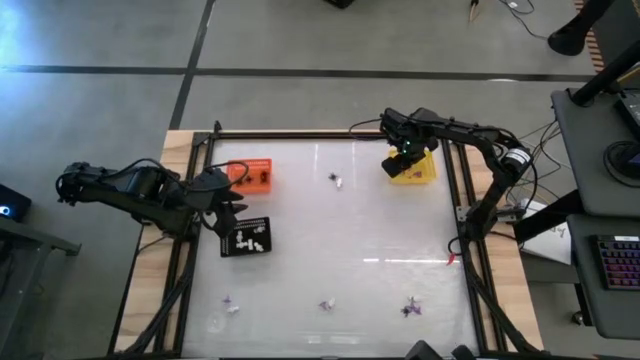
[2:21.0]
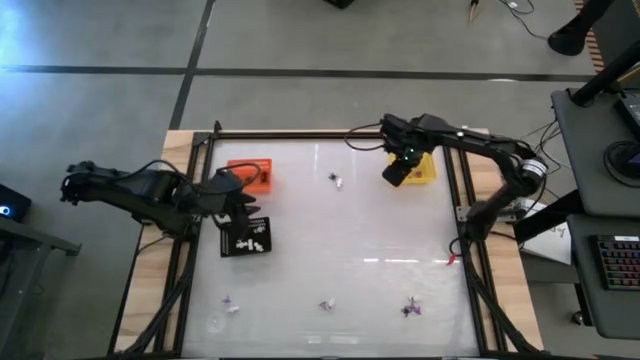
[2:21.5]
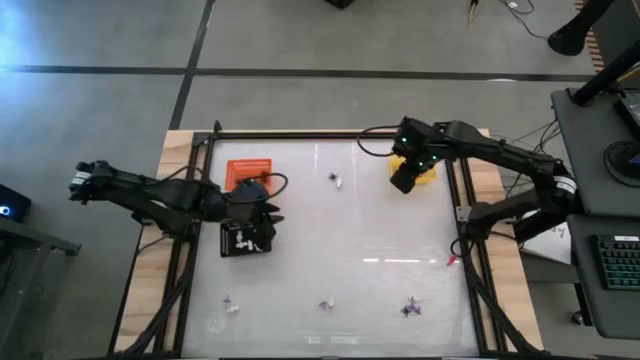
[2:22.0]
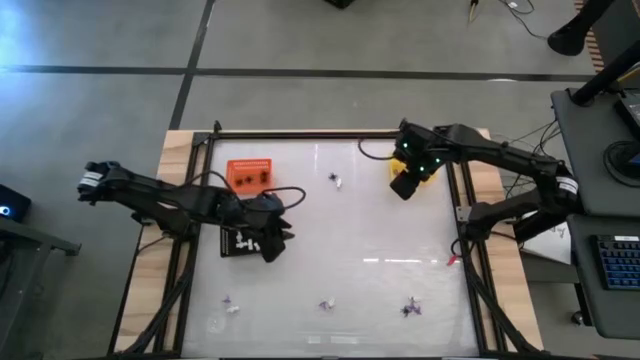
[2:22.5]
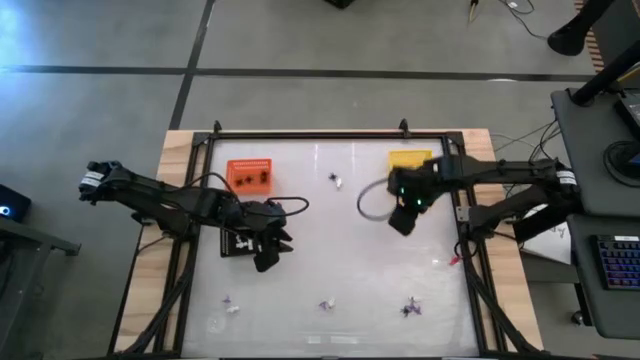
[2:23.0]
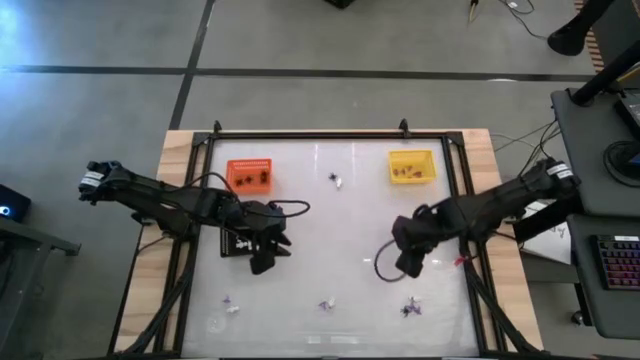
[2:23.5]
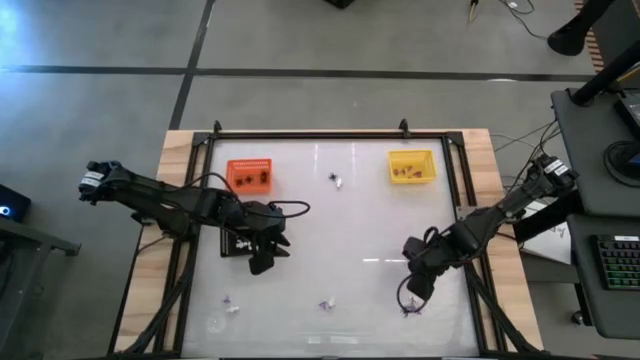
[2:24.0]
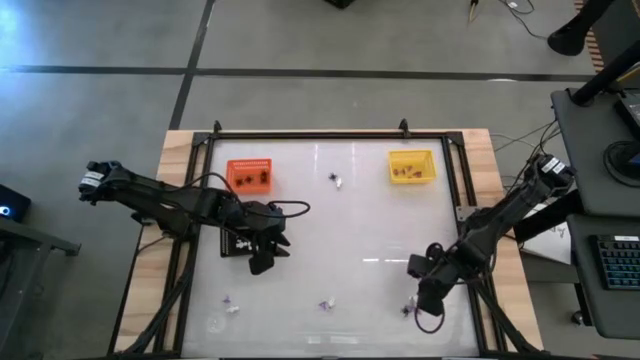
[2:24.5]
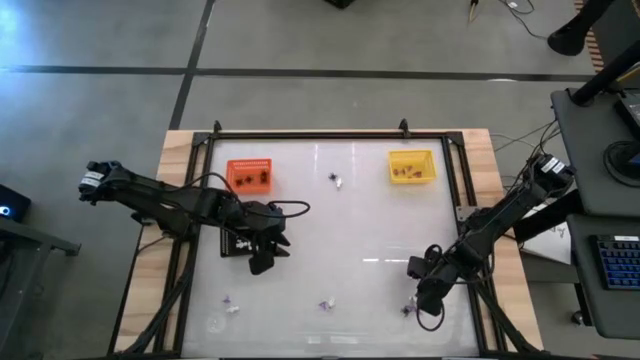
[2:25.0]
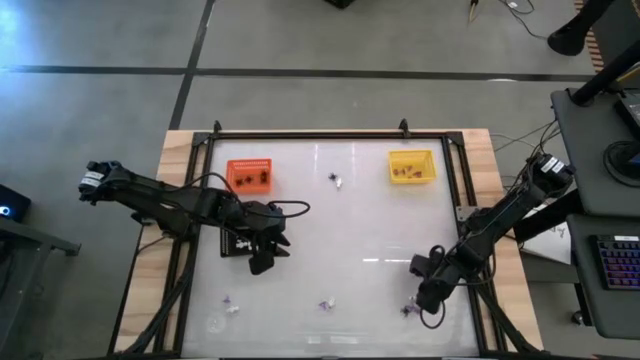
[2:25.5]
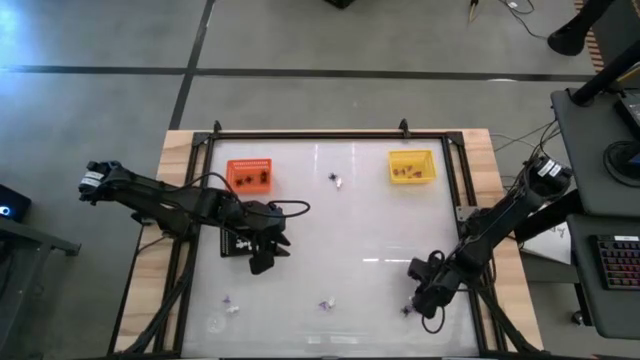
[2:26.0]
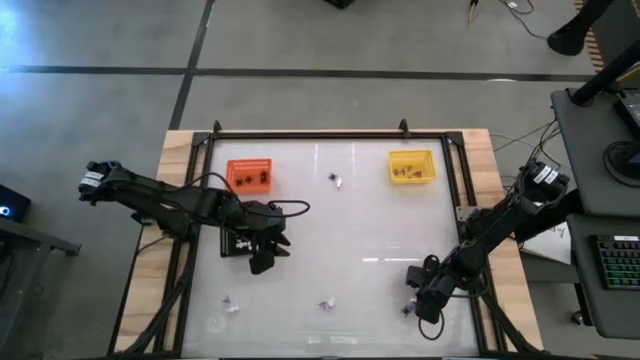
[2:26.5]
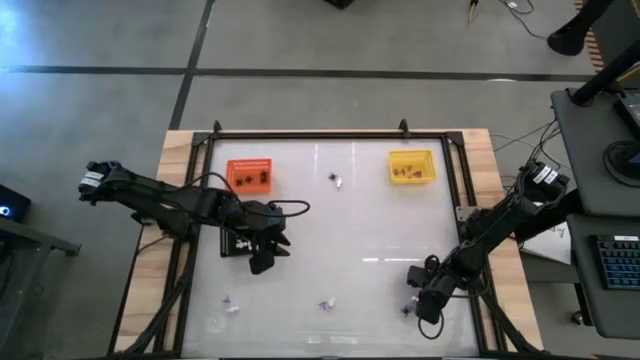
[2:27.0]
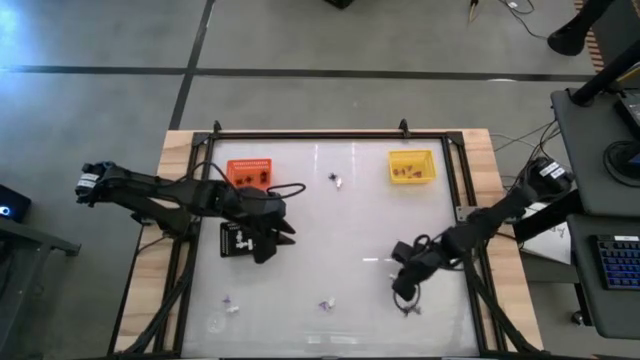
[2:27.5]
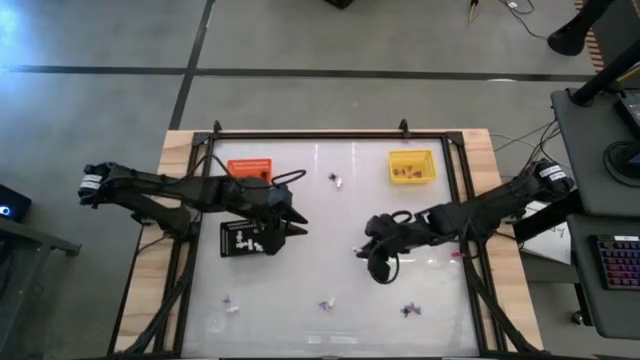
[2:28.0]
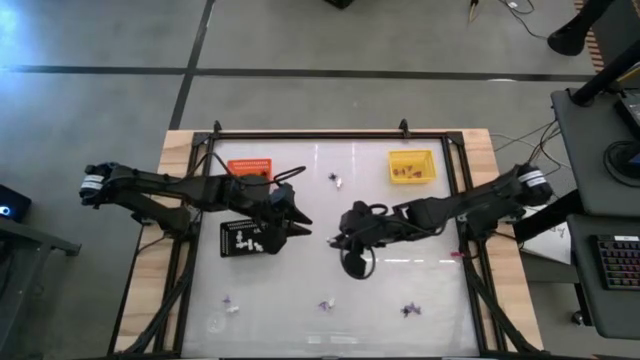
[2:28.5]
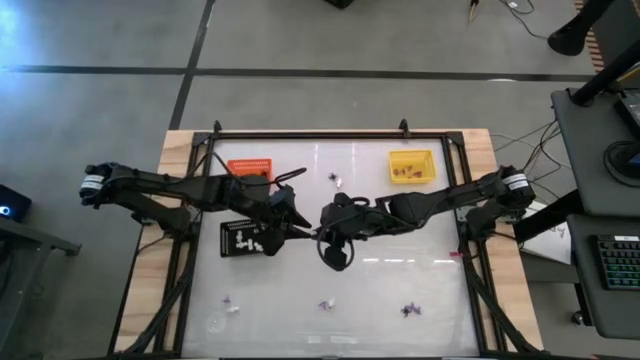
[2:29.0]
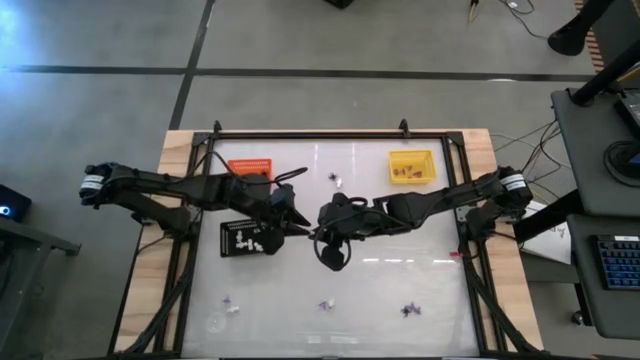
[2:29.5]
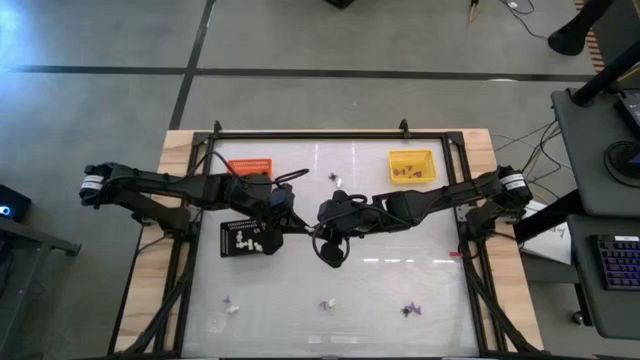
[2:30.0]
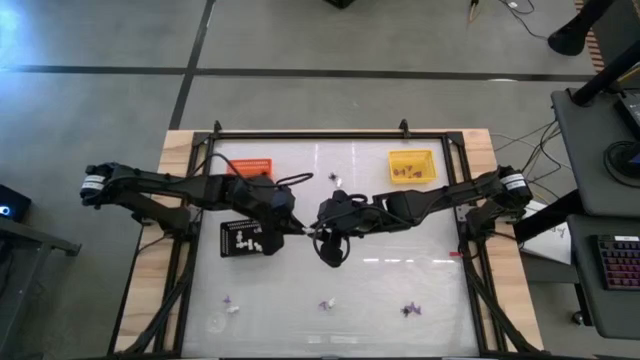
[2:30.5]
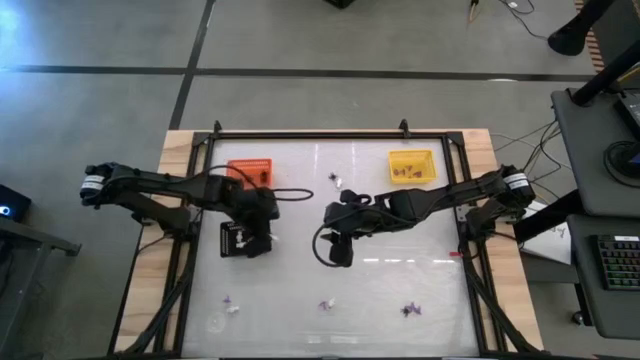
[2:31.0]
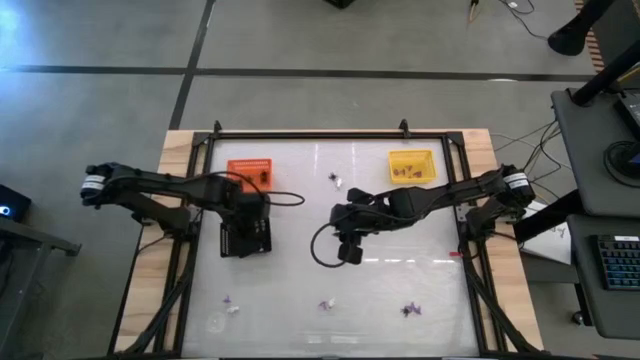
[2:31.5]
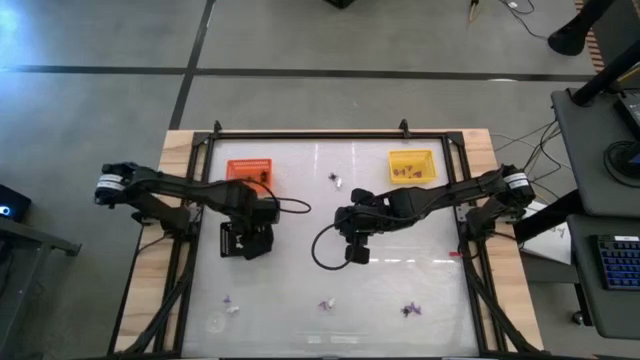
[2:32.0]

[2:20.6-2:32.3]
Task: Sort Halloween decoration
Put the white skeleton toy into the black bin

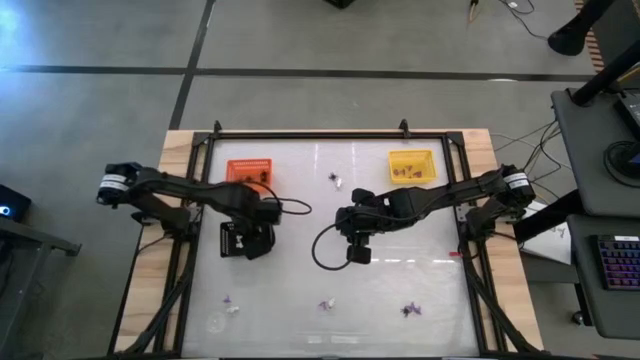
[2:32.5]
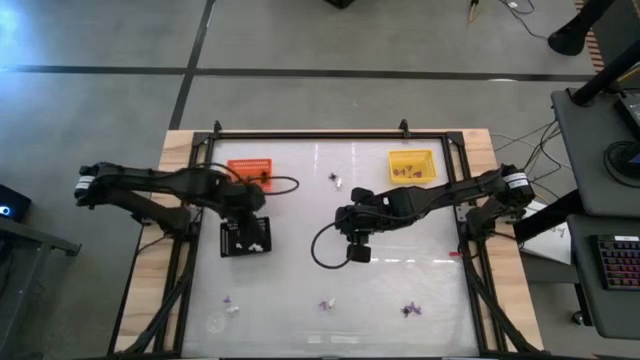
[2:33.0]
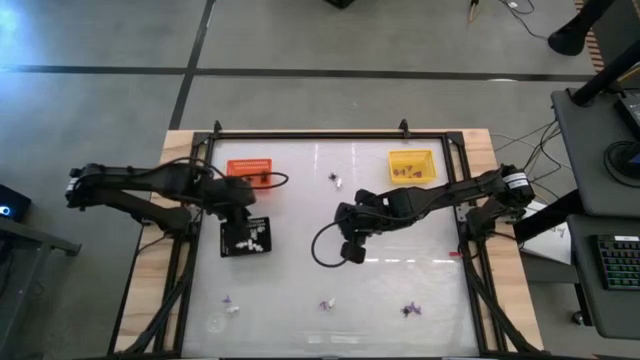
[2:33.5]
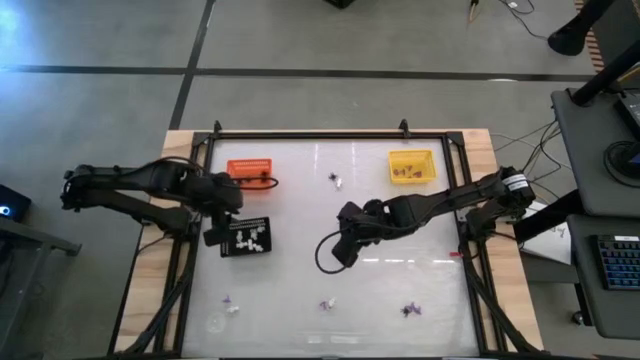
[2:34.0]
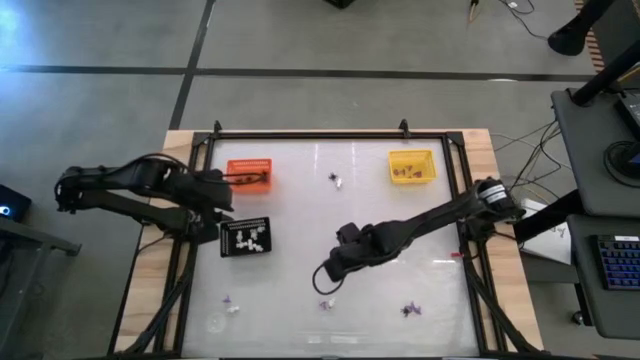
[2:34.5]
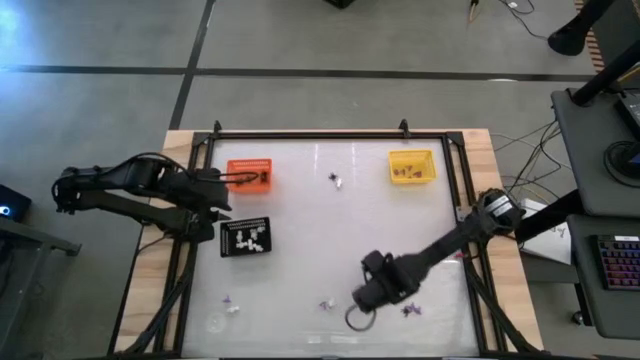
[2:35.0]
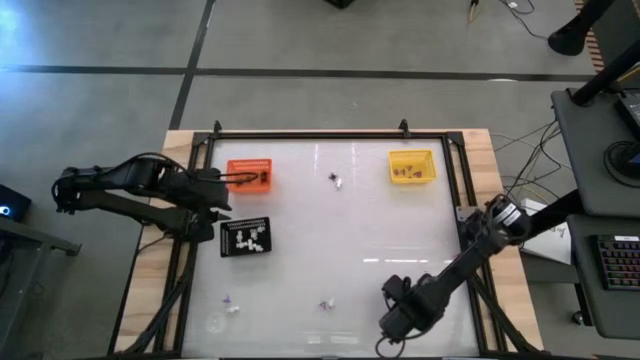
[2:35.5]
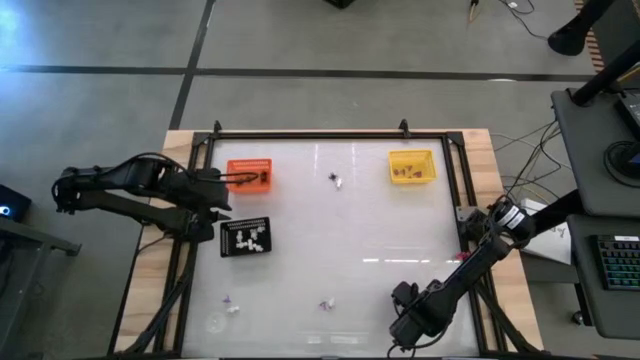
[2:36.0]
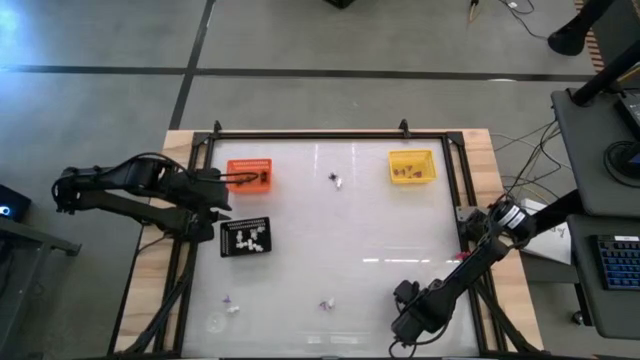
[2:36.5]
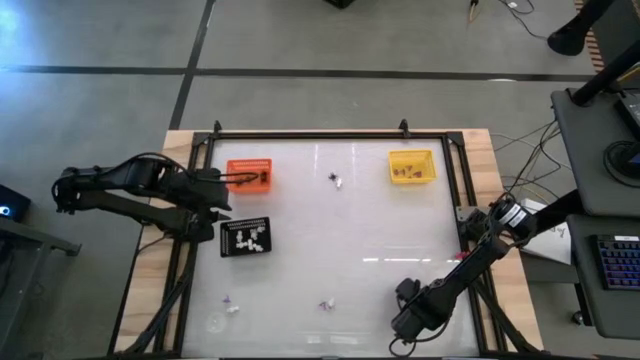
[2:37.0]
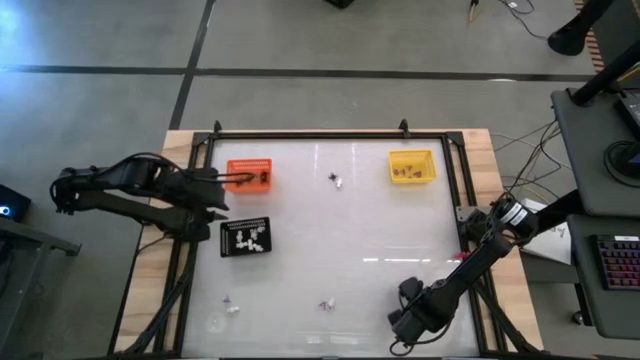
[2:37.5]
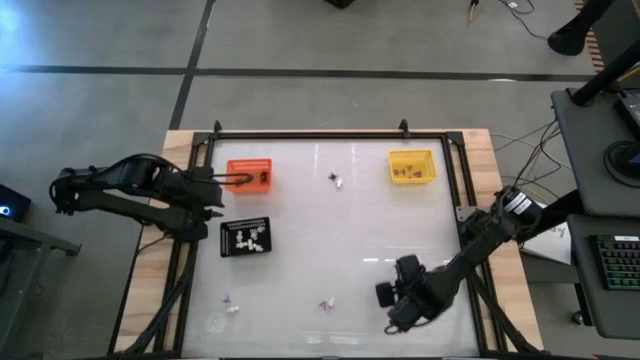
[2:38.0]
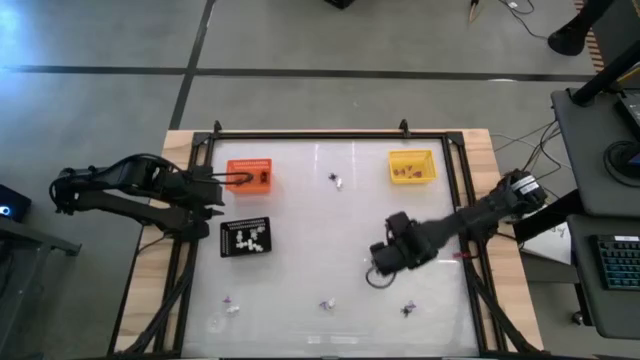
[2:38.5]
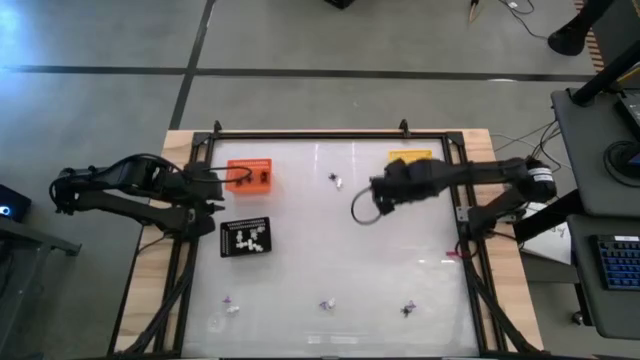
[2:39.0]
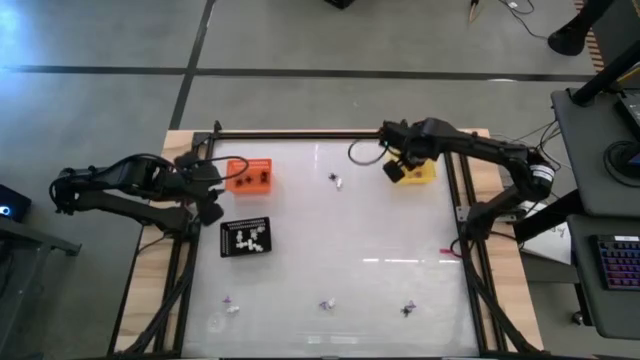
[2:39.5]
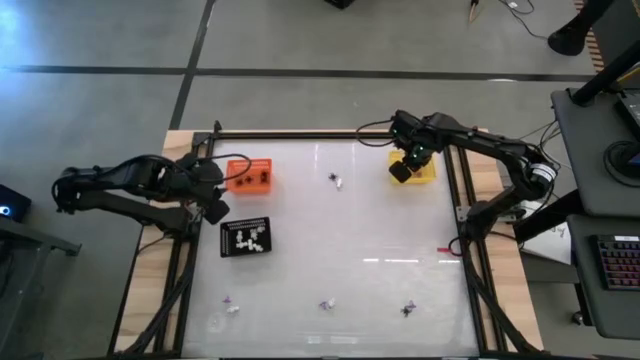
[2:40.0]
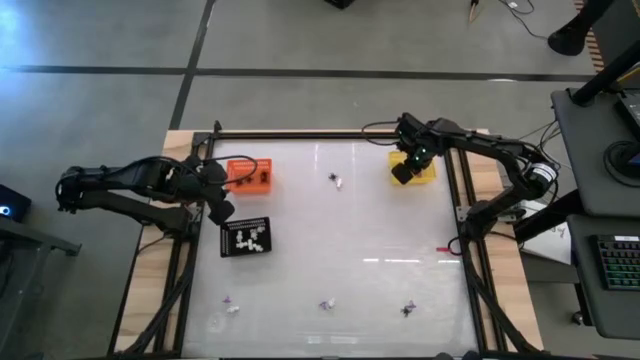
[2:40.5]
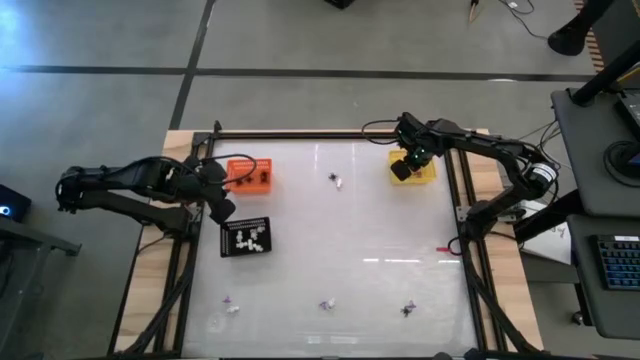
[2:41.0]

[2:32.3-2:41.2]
Put the purple witch hat toy into the yellow bin
